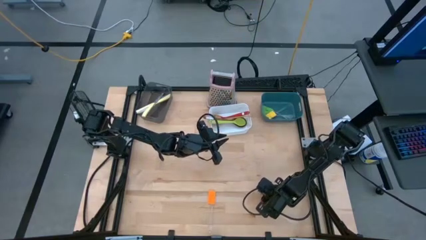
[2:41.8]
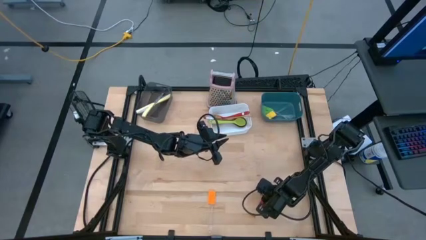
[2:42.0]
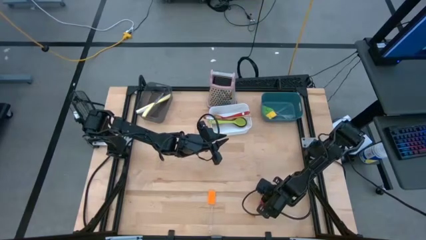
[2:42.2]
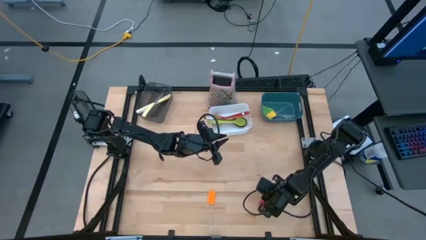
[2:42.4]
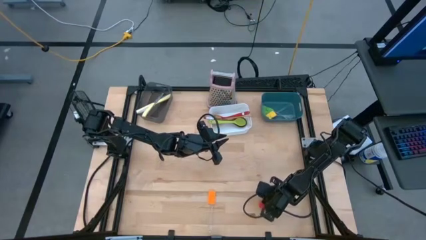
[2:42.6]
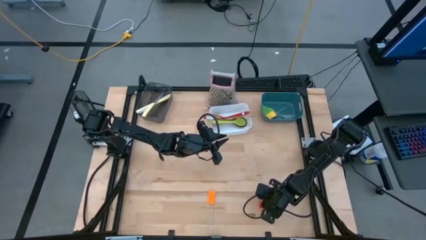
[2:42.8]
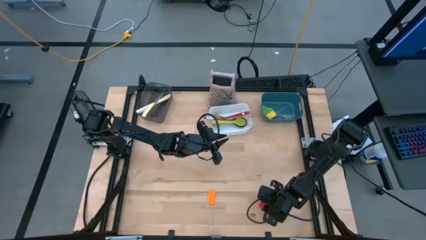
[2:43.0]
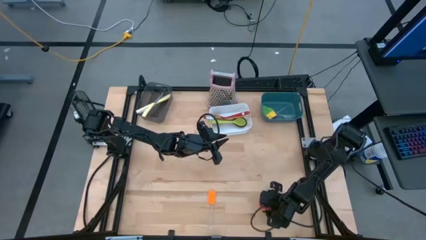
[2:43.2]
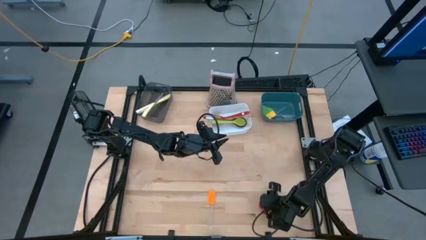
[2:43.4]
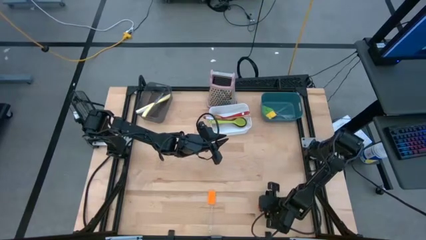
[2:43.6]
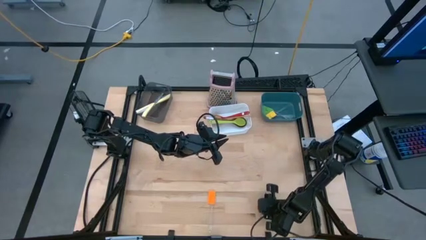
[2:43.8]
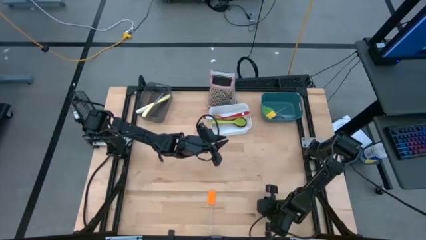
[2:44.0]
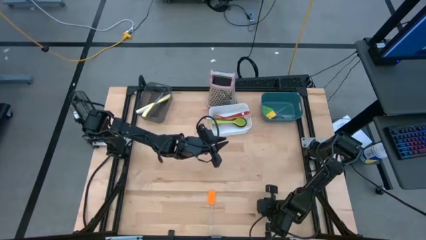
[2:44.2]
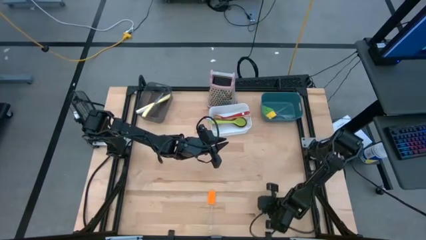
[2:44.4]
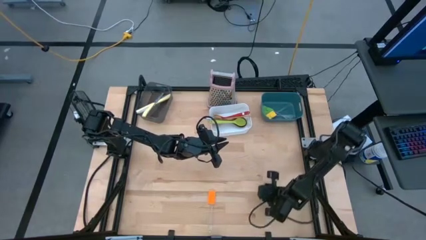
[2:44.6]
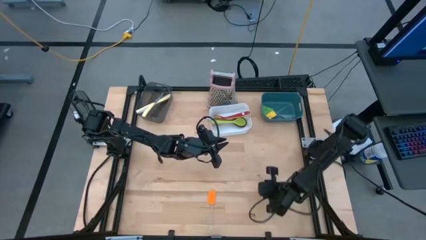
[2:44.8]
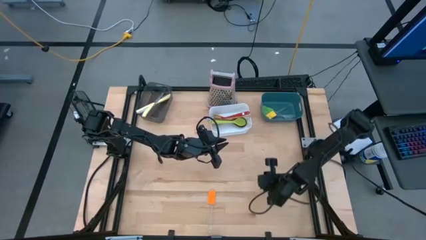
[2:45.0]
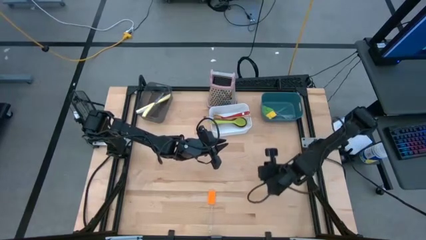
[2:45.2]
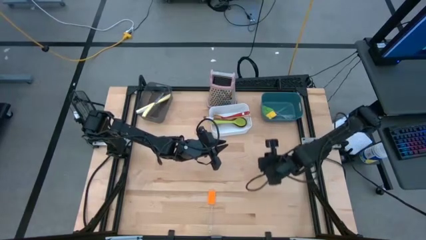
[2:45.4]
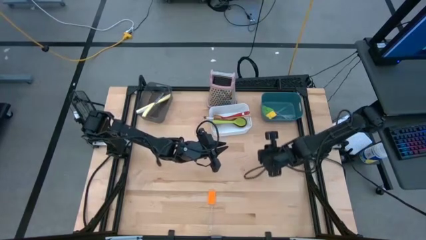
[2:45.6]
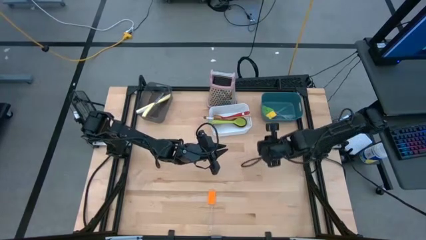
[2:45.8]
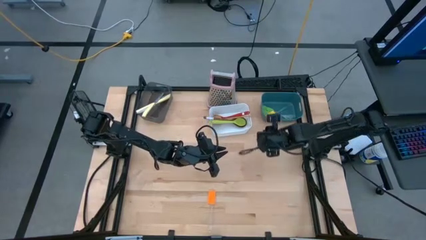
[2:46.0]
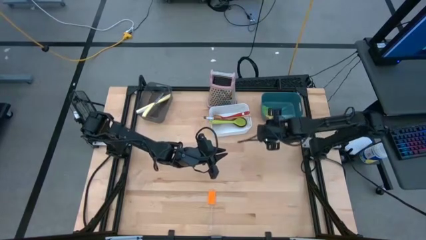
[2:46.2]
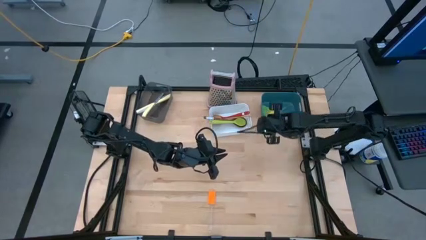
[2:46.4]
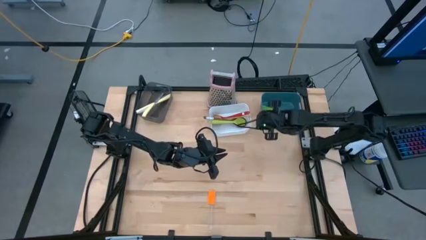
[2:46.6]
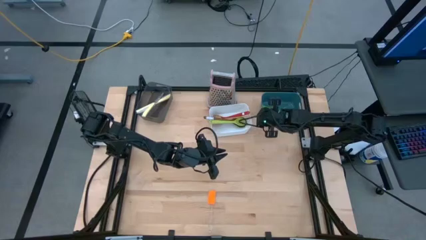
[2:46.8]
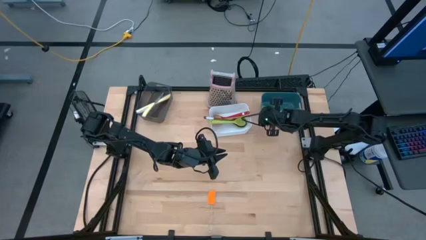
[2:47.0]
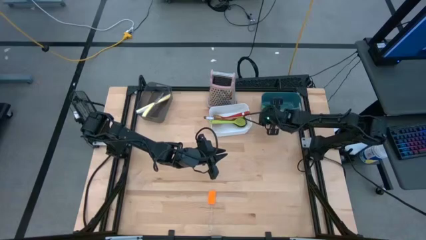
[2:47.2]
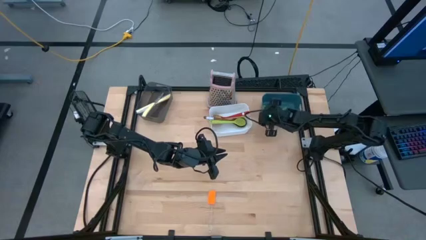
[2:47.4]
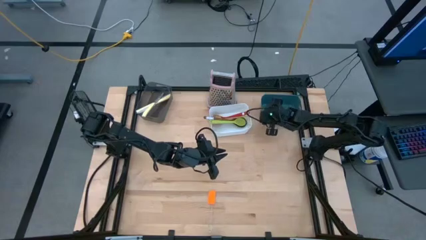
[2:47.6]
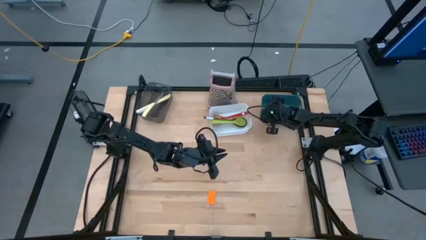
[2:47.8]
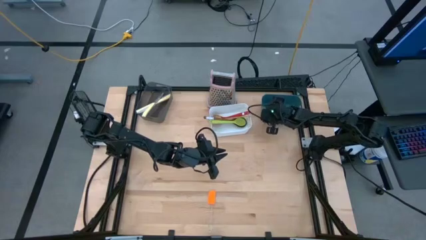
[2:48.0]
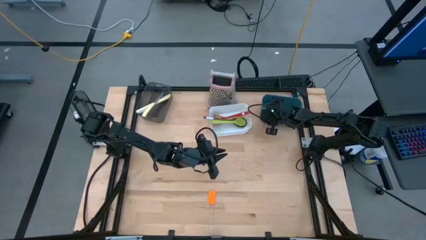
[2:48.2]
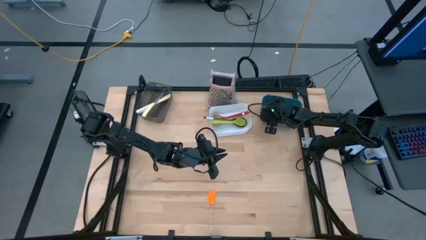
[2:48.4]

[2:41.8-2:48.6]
Task: Pick & Place Kitchen Items
Put the red spatula into the blue bin

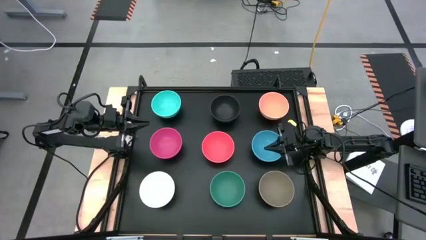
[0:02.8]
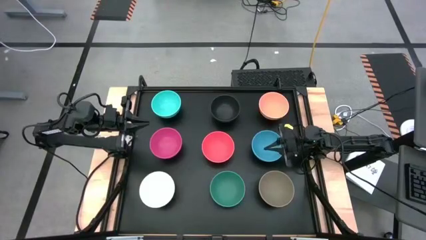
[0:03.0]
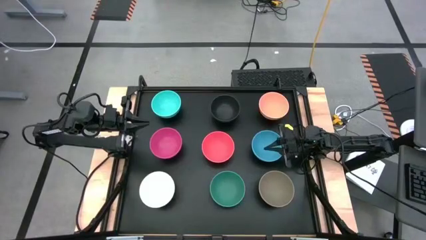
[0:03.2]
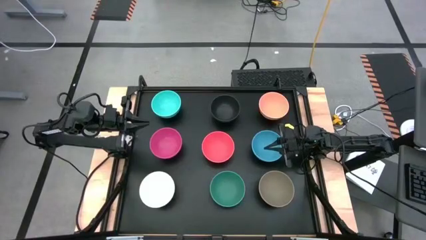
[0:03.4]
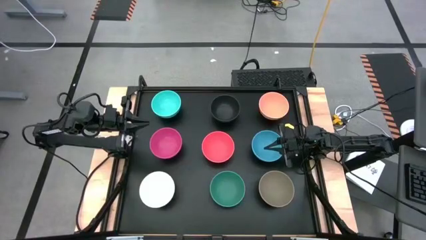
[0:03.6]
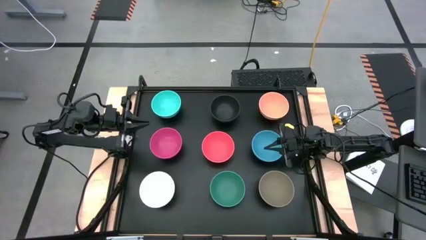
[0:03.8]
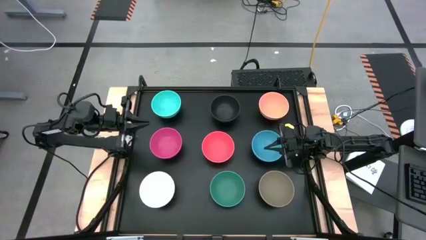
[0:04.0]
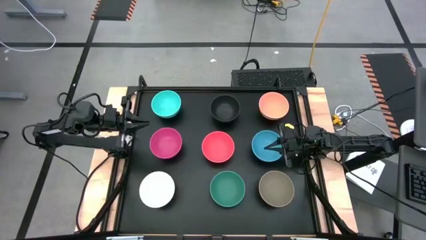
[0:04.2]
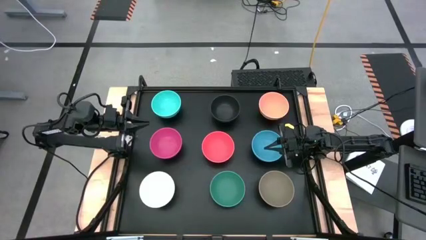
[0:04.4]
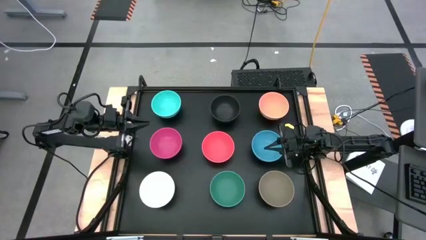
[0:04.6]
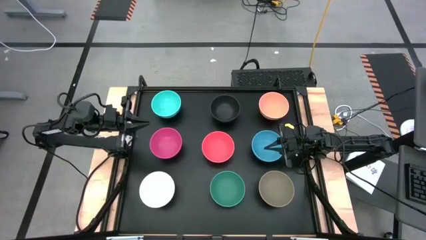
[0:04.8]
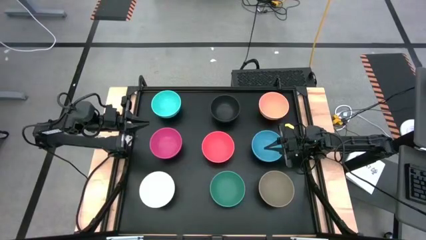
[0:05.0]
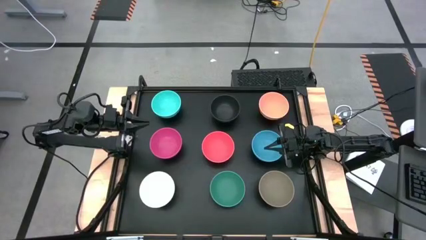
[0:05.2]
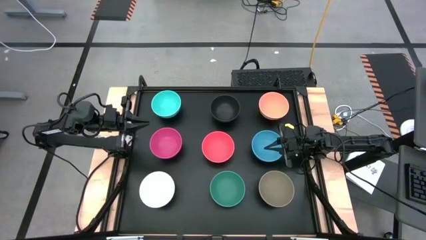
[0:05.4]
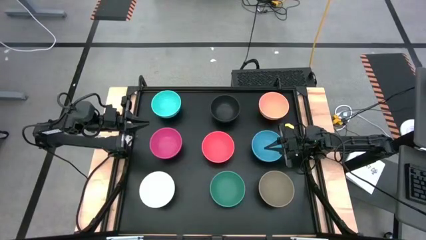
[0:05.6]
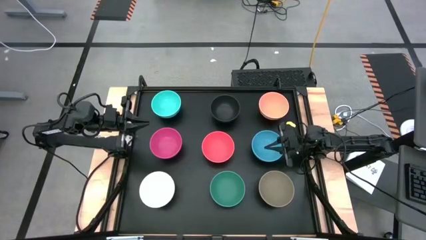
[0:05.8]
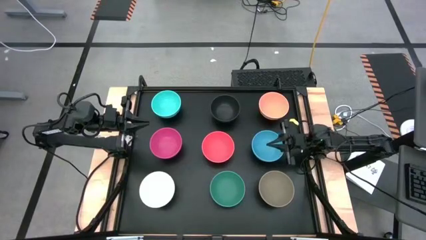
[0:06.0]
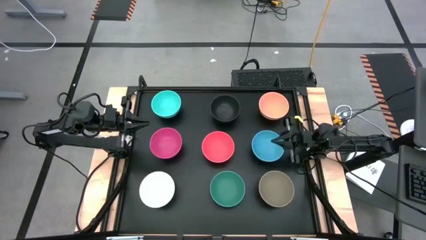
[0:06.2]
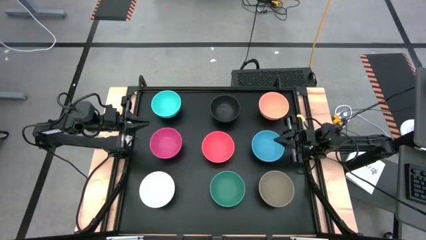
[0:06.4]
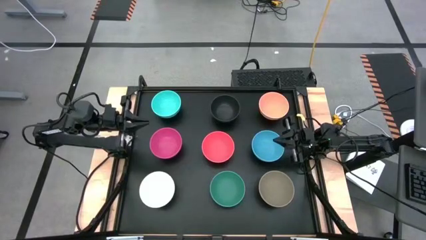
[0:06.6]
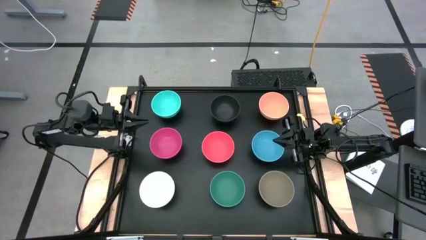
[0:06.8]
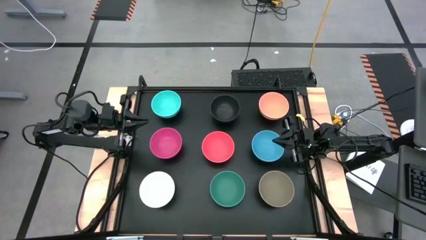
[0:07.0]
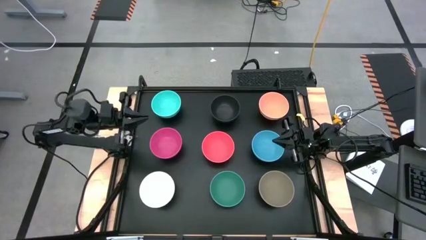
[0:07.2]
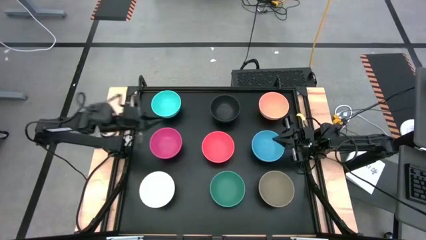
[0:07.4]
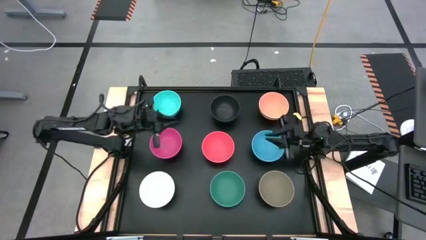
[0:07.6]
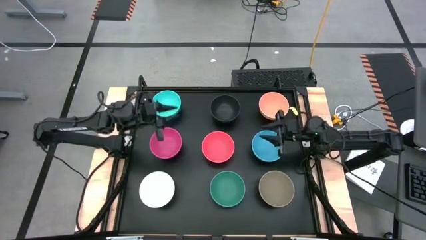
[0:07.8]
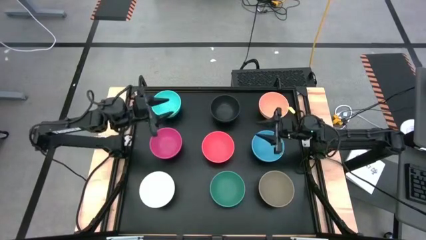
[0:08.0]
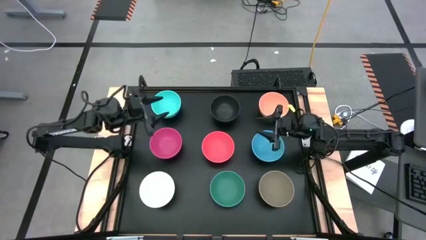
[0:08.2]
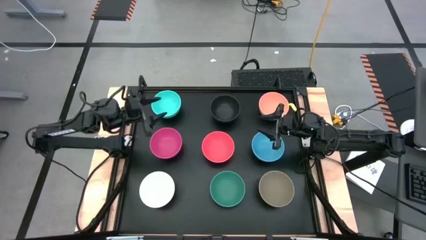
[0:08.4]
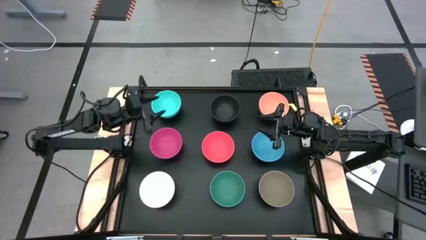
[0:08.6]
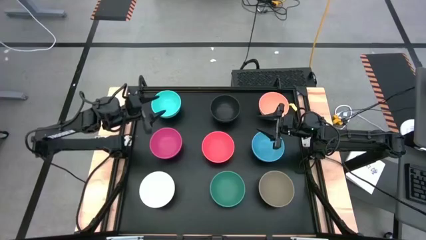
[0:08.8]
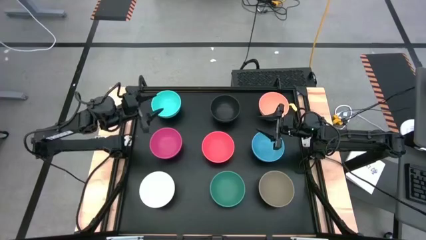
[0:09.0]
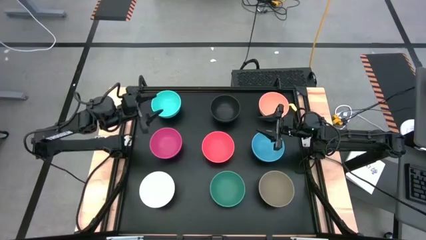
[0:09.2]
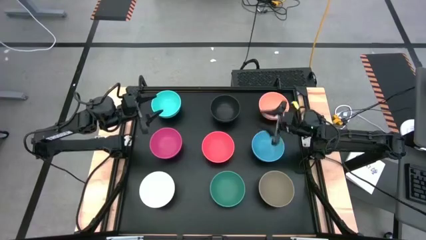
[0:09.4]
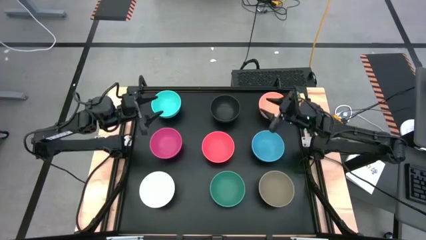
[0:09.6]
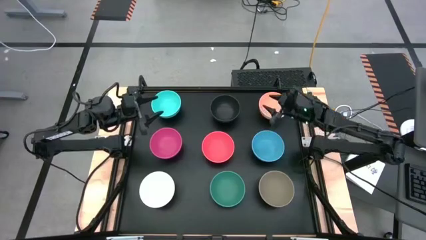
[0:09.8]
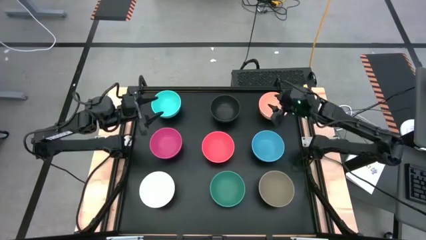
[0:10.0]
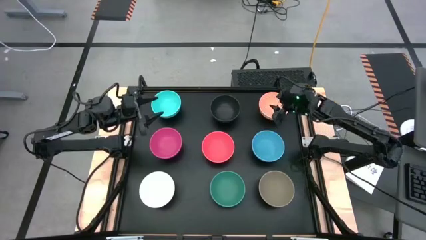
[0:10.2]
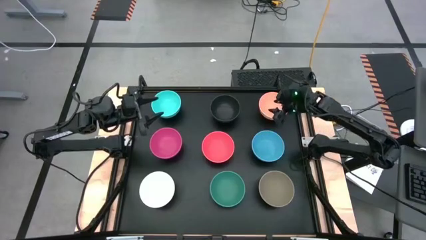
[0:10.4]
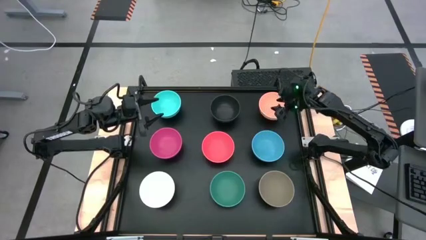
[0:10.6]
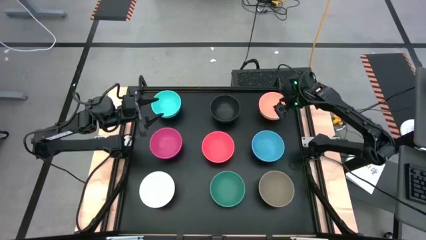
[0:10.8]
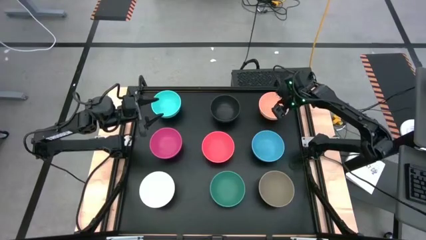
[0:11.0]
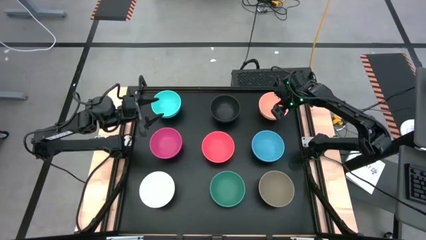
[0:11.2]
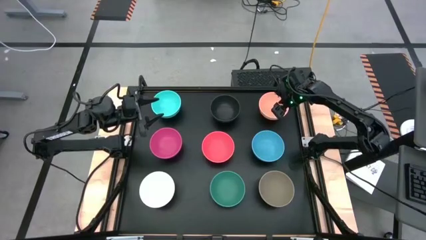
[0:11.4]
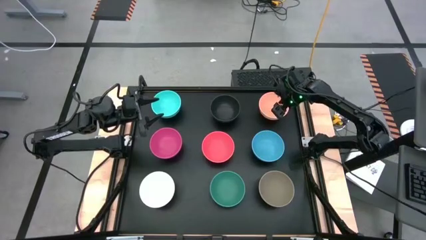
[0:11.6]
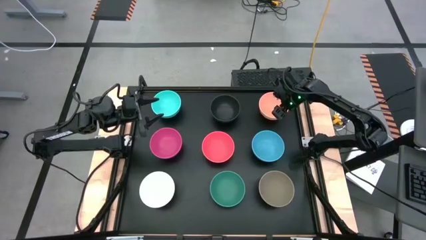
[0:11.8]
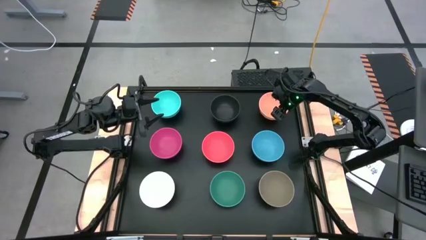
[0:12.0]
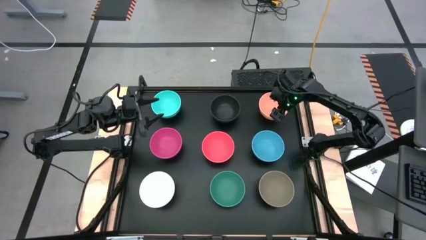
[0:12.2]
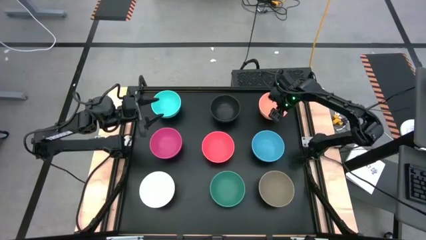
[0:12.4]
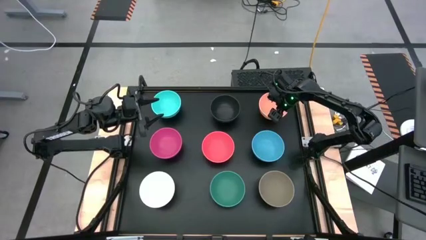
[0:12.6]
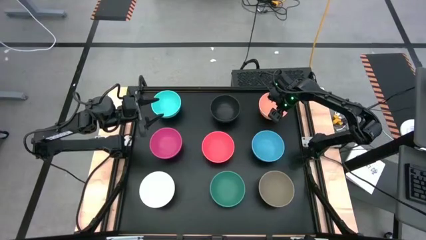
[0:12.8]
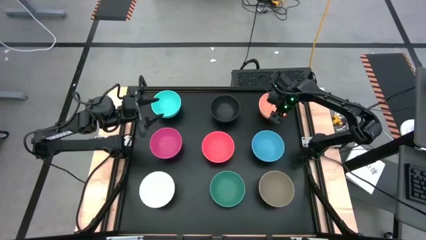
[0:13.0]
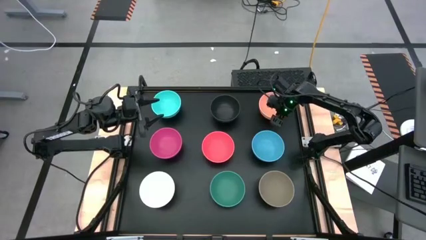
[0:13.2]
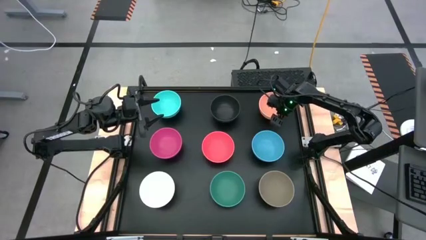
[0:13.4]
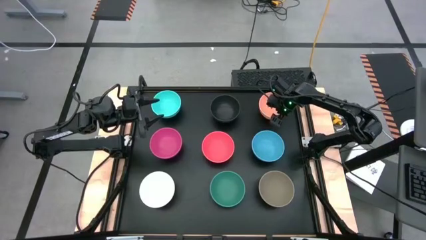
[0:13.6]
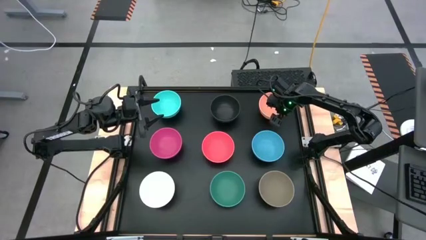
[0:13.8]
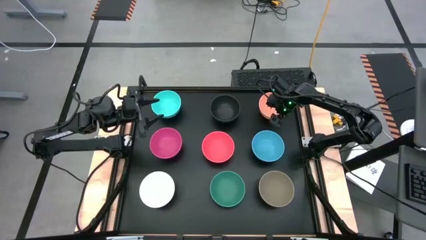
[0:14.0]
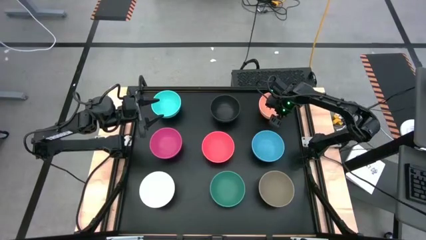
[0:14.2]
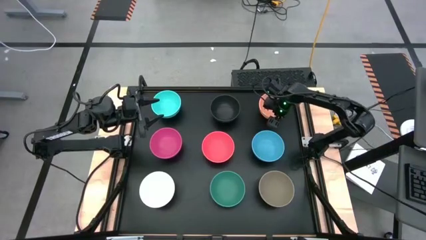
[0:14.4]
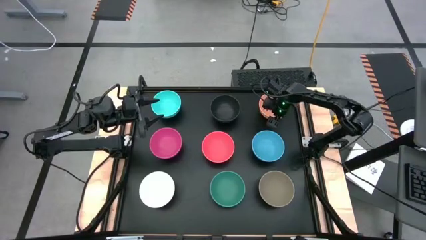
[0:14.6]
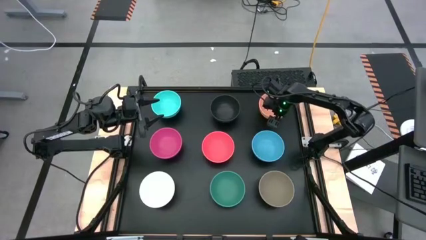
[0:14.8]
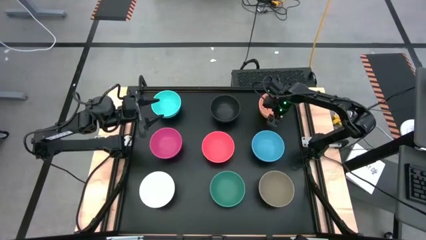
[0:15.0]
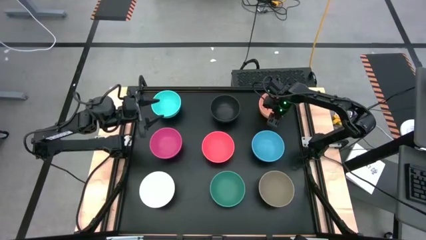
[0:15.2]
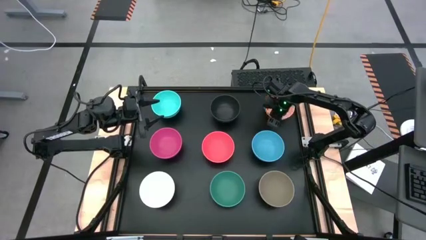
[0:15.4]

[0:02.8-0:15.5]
Task: Nest bowls inside each other
Stack the light orange bowl on top of the green bowl
